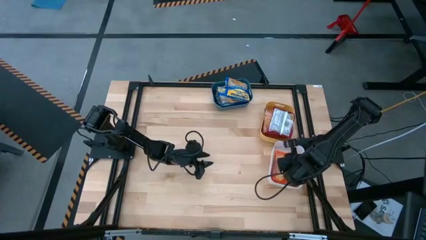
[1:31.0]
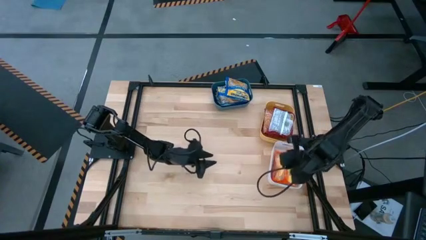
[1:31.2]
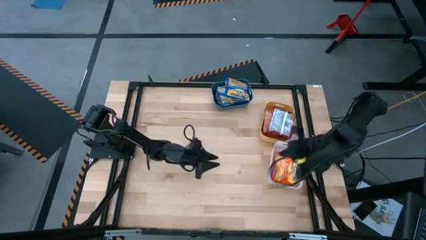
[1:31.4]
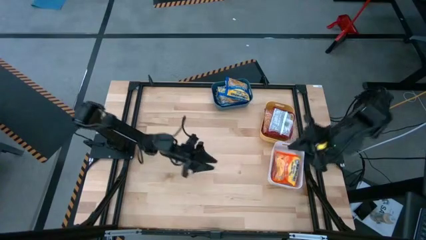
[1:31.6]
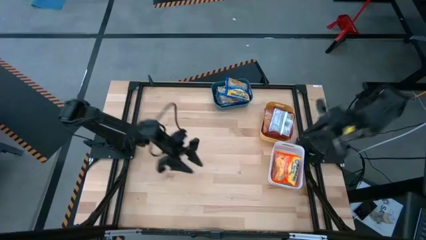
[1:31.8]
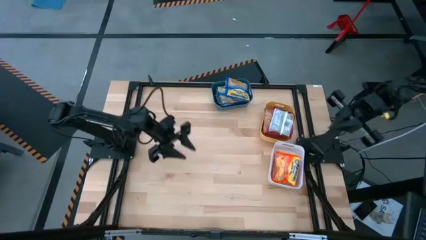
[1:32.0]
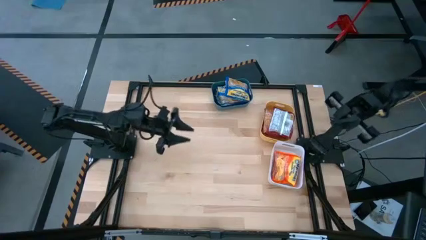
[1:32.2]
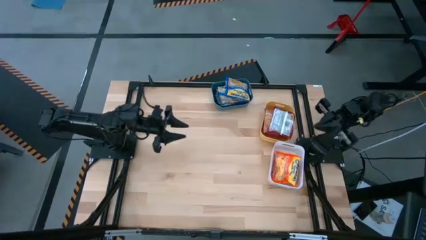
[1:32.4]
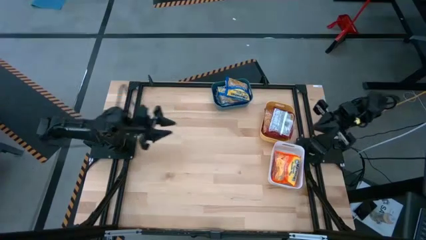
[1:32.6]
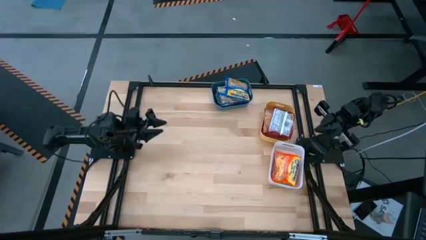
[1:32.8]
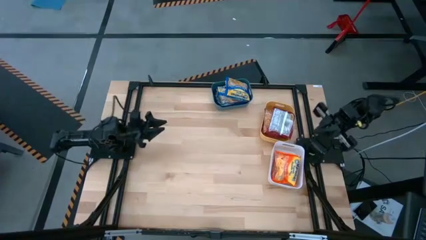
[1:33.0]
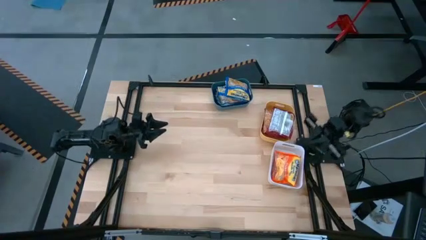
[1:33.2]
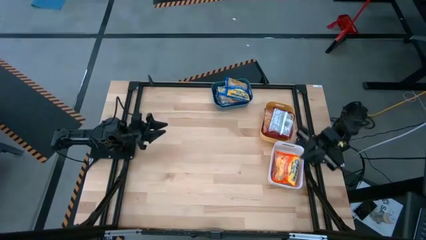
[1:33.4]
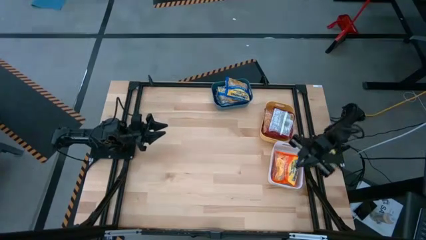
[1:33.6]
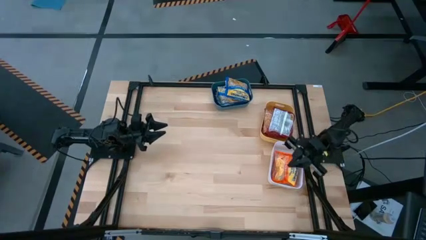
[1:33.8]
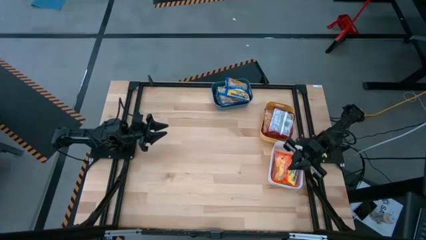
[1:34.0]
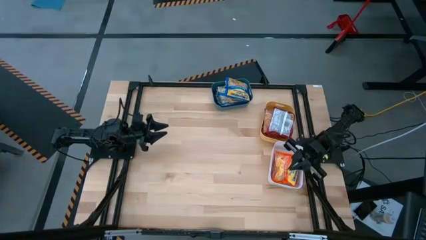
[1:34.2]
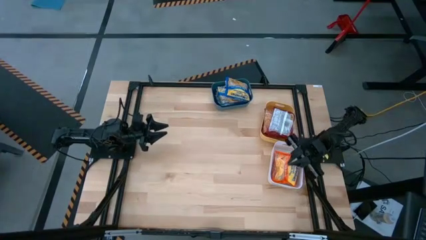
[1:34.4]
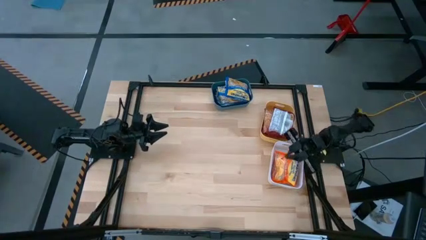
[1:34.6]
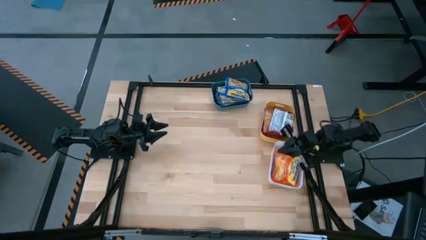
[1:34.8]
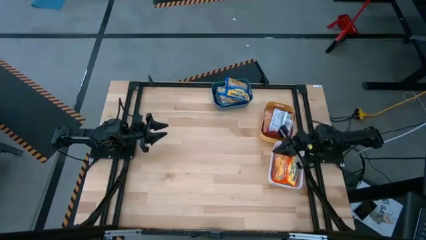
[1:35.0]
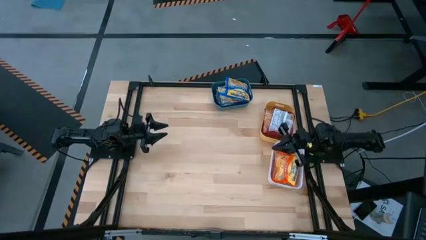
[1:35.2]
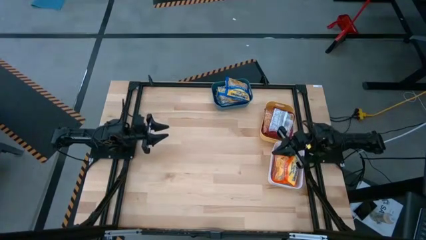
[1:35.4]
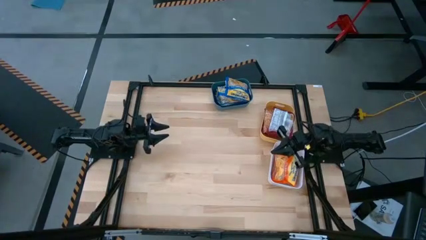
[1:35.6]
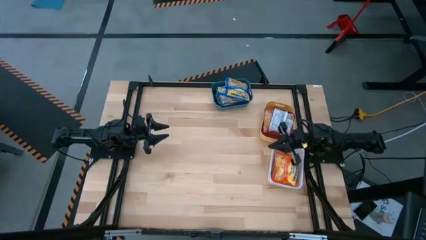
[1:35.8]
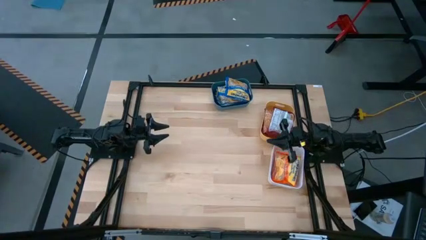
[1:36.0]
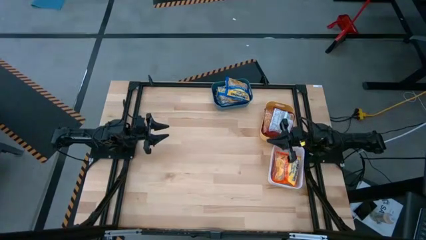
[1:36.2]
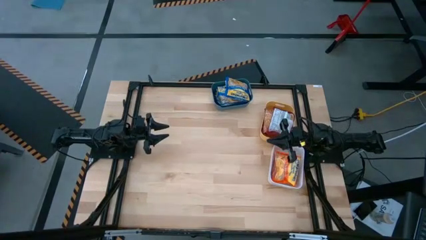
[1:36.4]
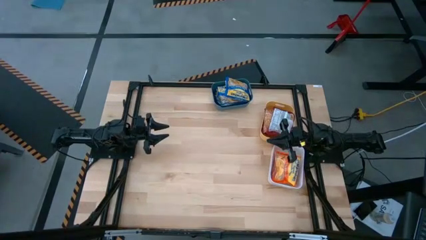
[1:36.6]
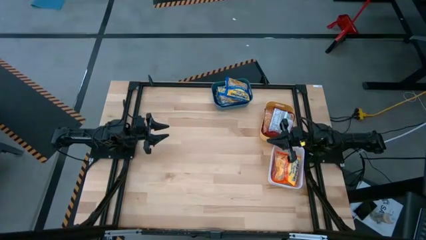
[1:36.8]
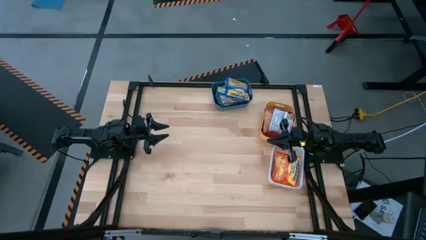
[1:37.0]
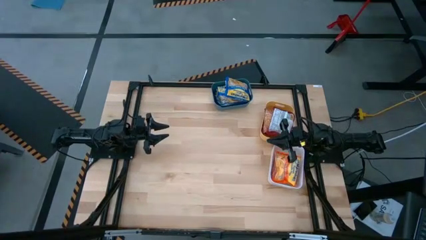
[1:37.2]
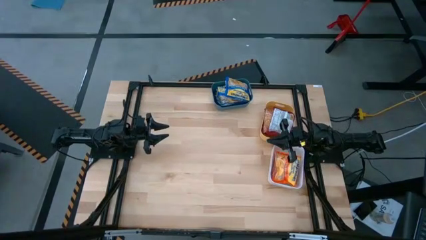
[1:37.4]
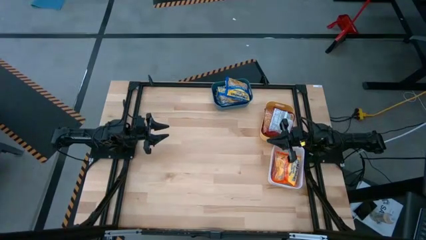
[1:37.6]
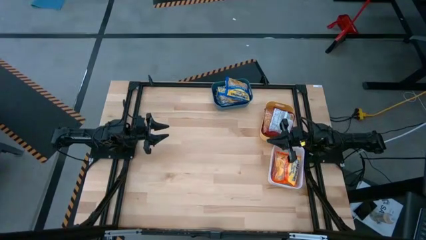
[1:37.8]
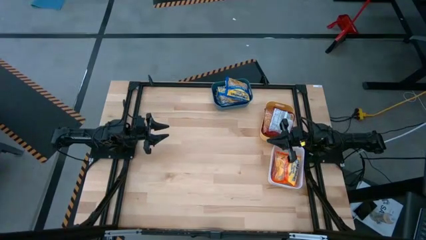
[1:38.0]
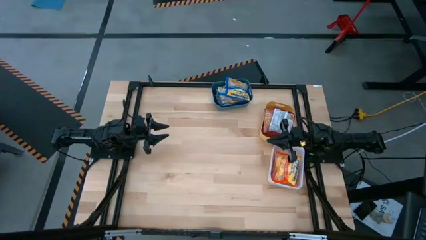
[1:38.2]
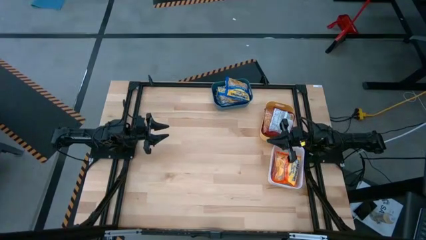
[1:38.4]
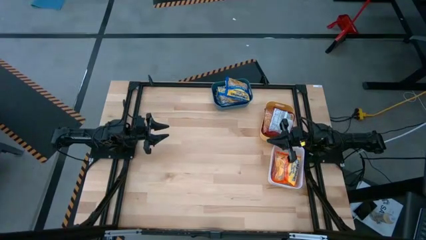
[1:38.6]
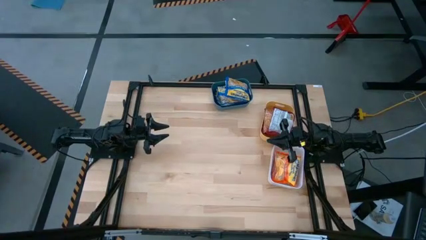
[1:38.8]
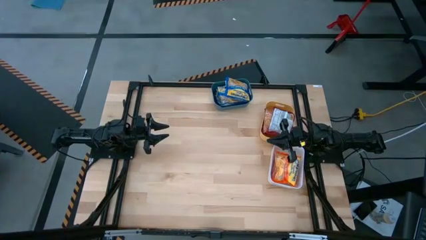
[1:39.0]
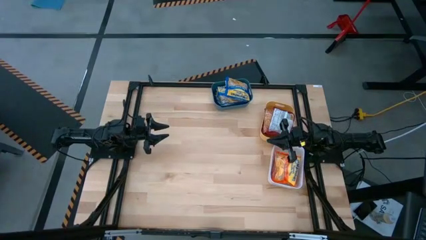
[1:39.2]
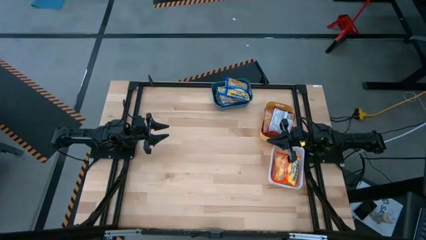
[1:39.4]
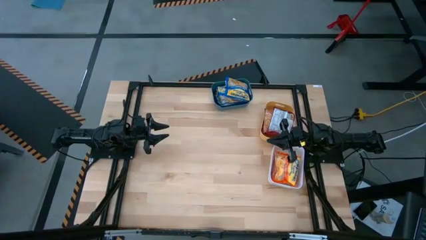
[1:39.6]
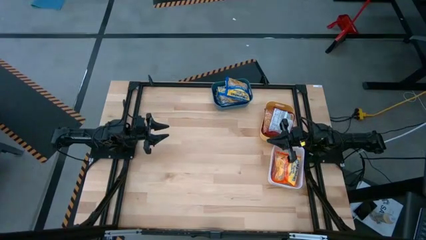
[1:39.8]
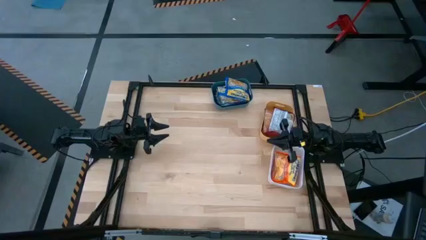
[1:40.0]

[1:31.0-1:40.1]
Task: Sort Maruchan noodles
Return to Home Position
